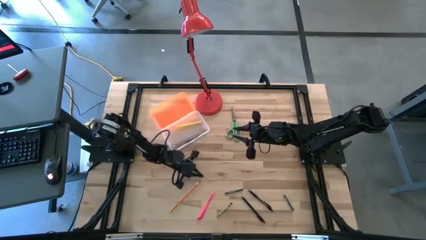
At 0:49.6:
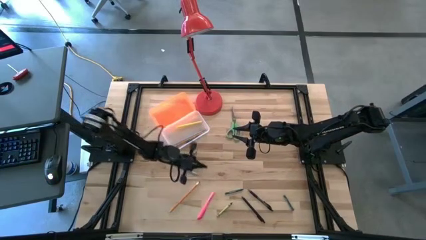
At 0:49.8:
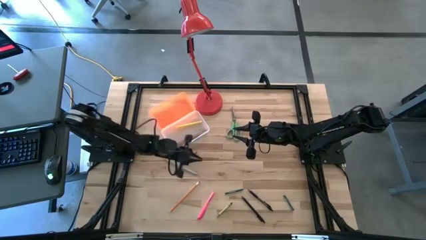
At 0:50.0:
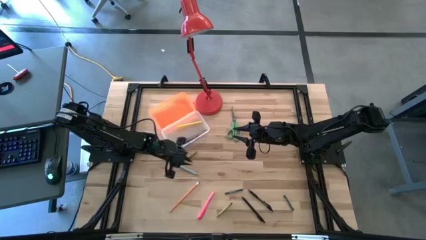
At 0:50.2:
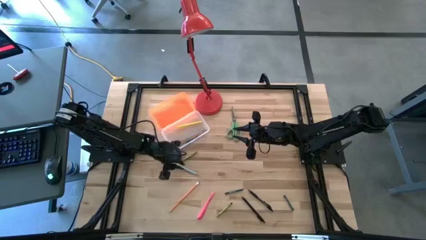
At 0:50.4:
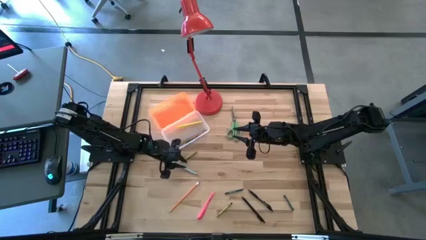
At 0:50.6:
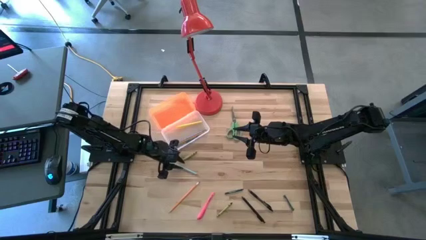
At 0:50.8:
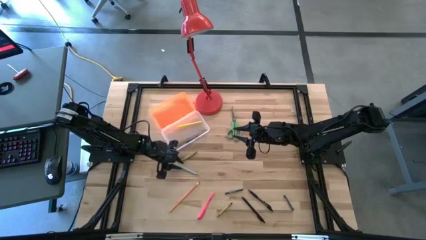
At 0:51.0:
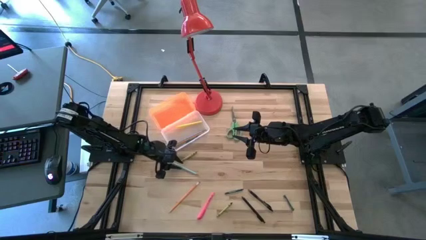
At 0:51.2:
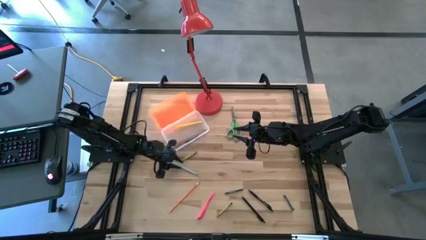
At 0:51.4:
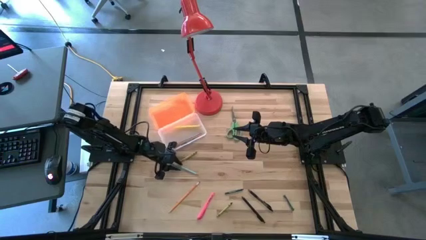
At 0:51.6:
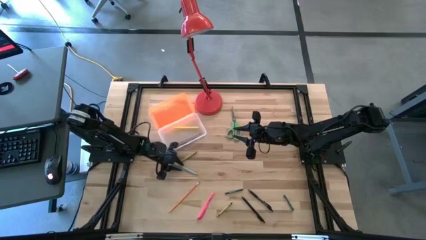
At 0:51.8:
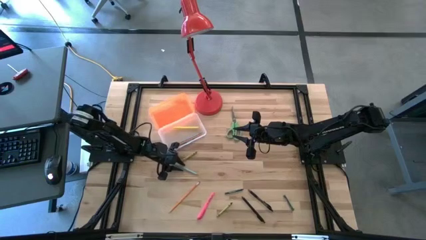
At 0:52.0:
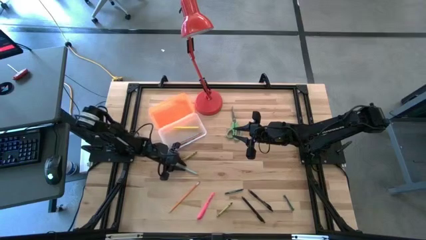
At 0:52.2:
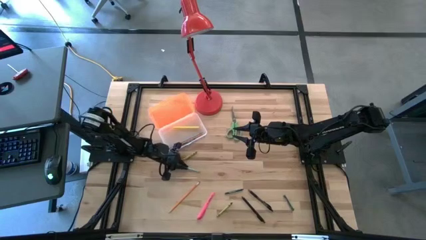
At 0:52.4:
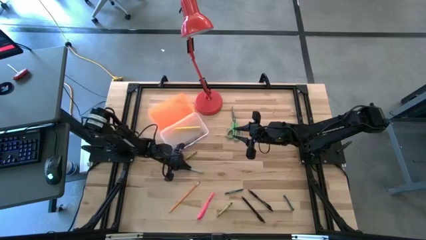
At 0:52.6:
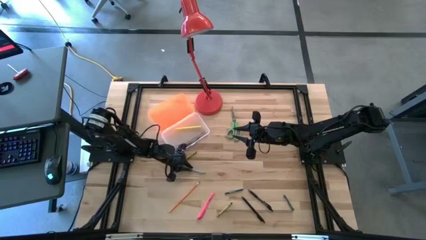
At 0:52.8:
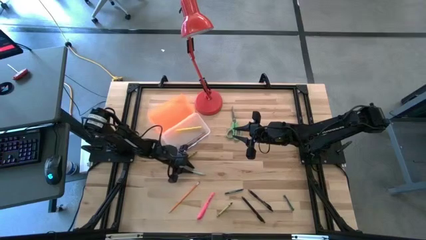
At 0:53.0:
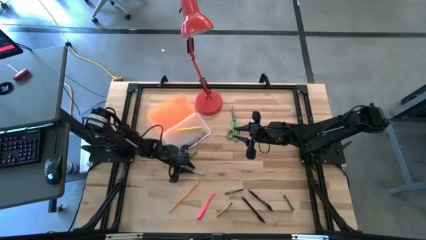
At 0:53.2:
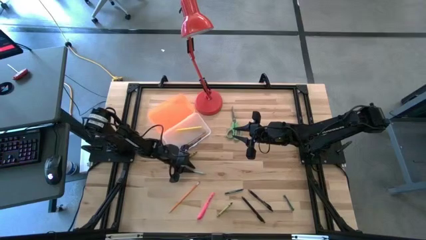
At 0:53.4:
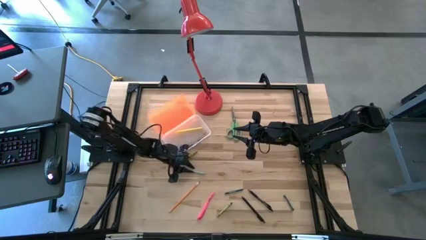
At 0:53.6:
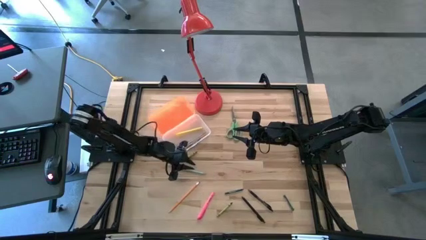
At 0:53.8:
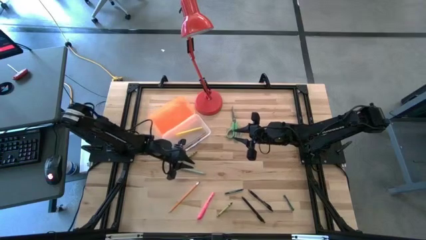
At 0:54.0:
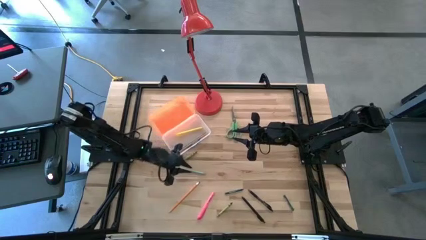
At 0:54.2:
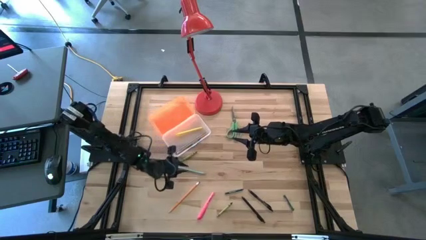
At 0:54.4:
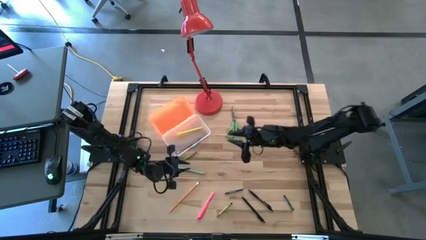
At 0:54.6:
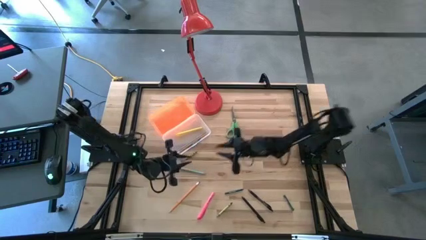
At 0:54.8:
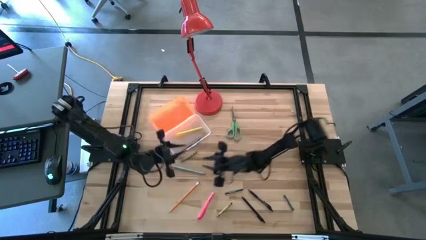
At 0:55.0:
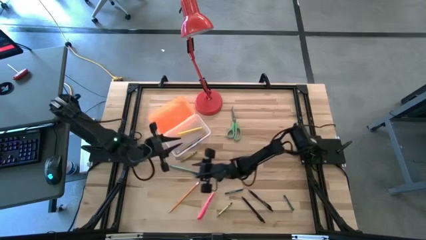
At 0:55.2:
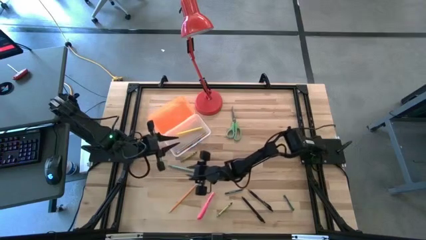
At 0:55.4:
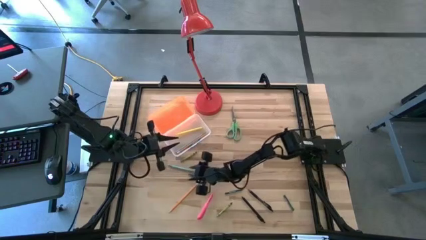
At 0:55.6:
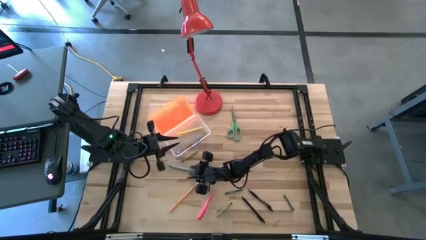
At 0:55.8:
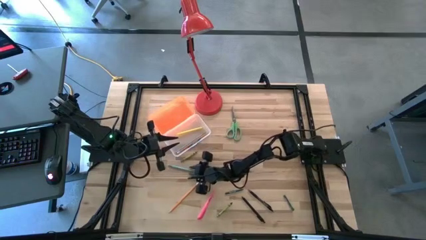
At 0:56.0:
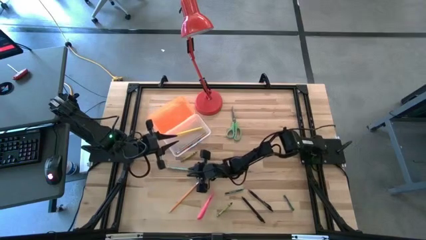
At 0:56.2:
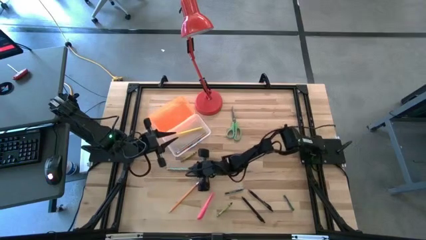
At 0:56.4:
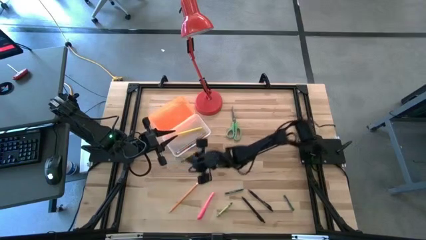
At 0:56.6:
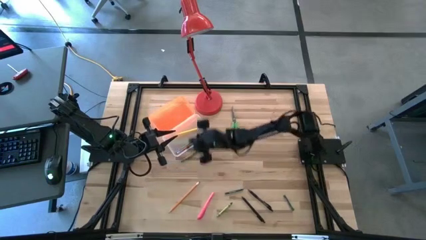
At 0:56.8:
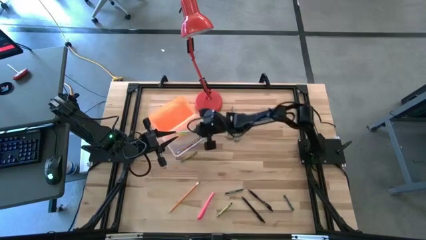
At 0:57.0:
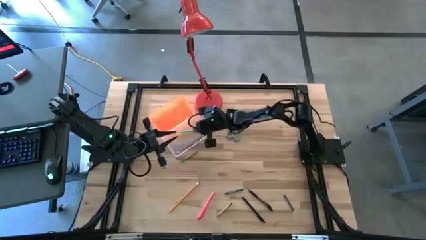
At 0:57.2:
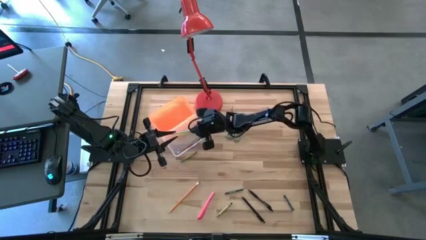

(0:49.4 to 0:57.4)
Task: Pick & place school supplies into a supply box
Put the blue pencil into the orange supply box

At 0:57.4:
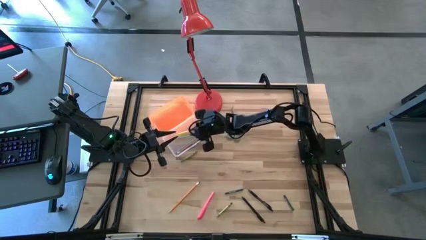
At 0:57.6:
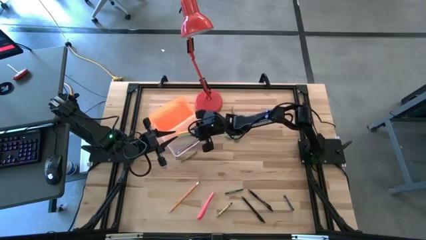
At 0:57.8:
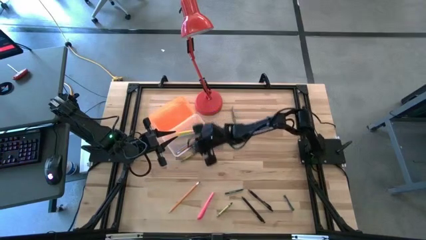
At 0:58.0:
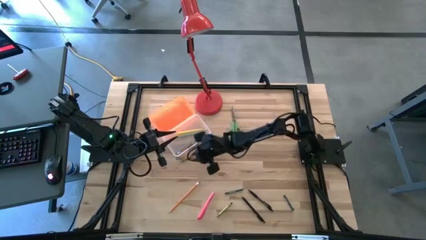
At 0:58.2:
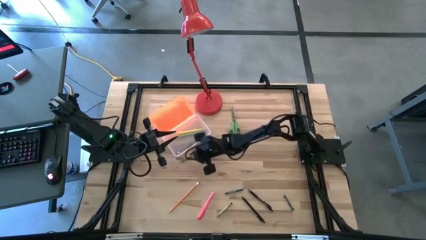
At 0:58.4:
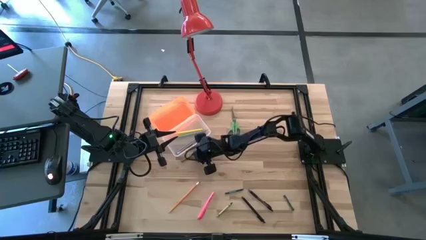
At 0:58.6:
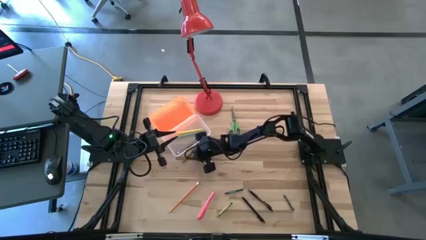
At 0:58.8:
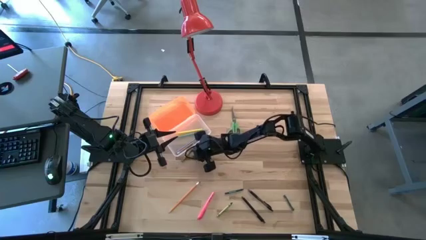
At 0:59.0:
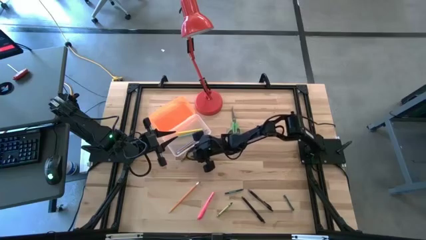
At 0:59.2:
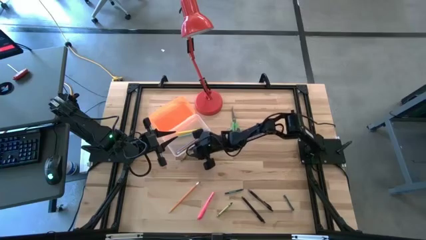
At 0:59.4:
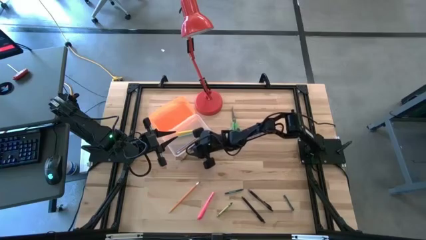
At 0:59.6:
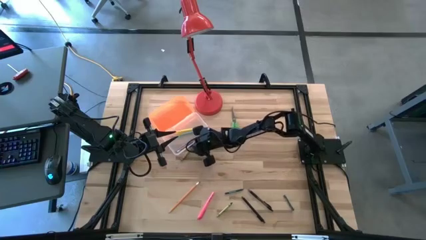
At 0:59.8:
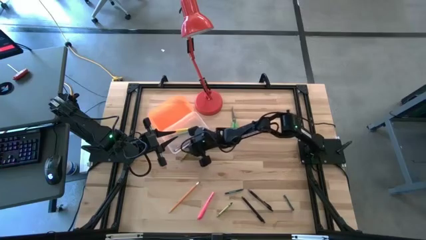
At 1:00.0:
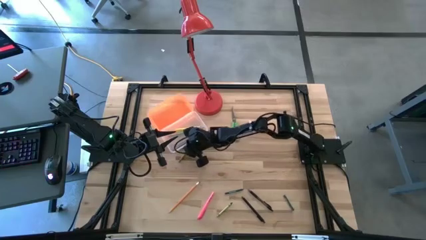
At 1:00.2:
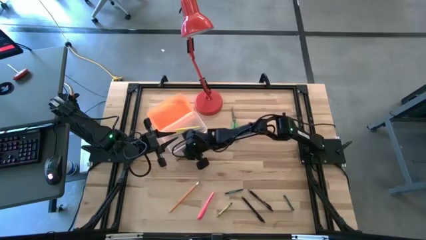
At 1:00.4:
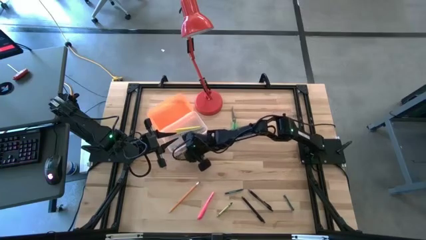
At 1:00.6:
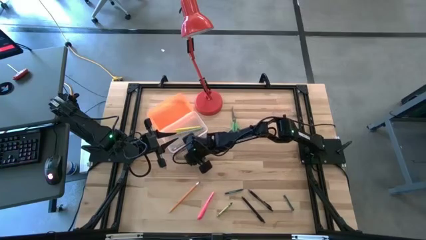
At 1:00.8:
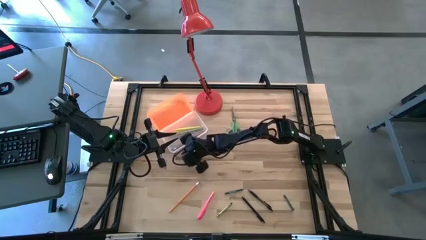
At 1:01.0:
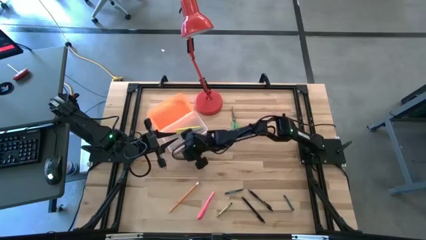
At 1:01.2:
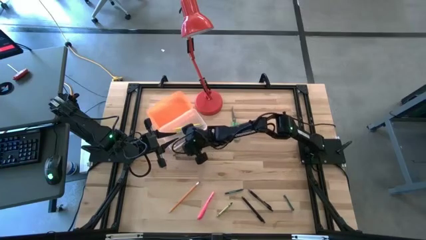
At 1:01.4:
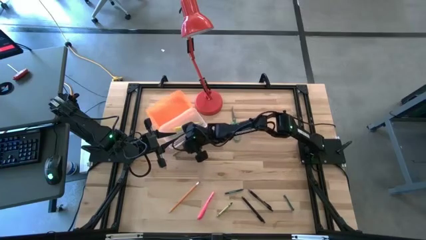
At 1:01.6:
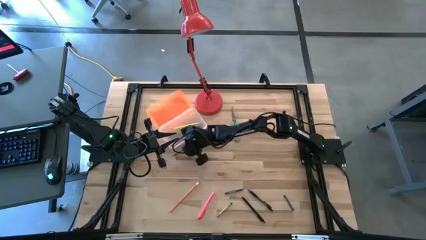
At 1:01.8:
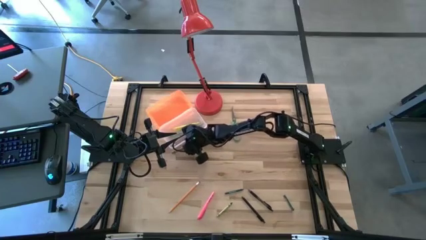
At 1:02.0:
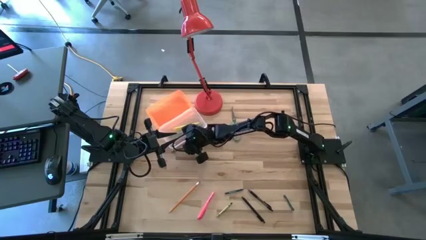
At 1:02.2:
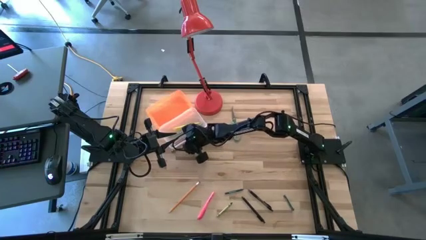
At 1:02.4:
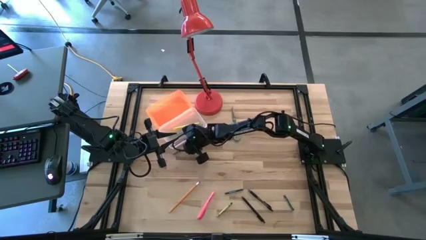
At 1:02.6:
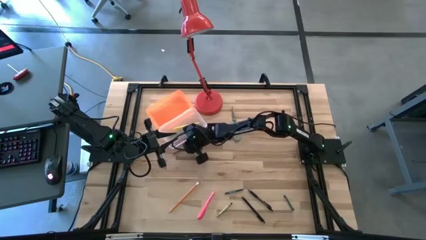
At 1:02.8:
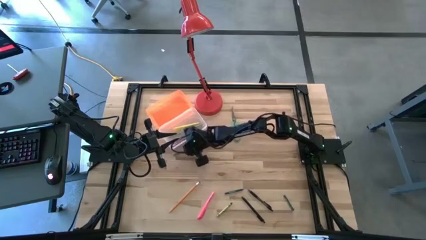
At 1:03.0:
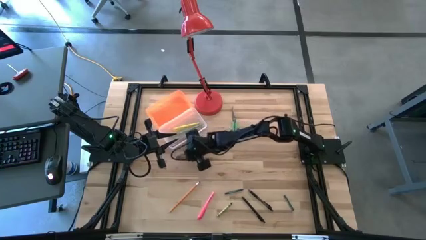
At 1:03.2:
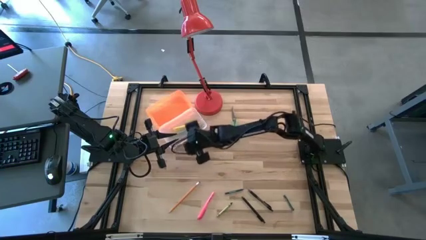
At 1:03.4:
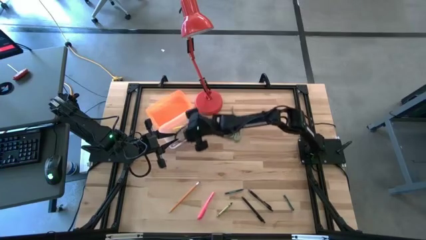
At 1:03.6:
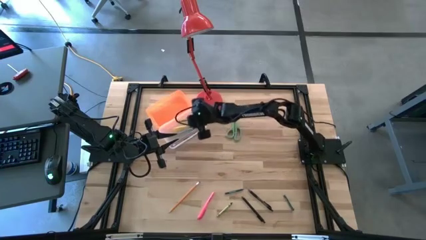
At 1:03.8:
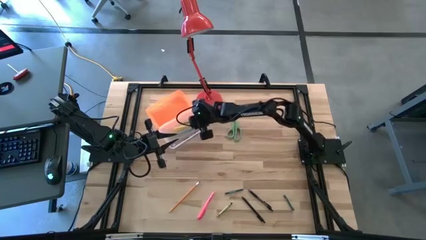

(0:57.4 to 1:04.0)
Put the top light green crayon into the orange supply box

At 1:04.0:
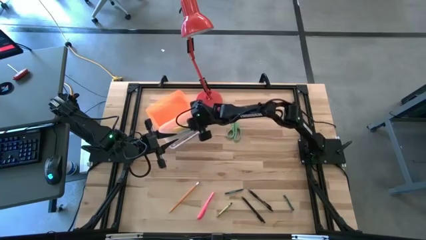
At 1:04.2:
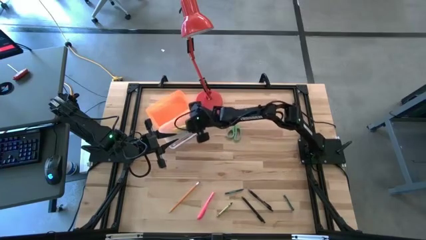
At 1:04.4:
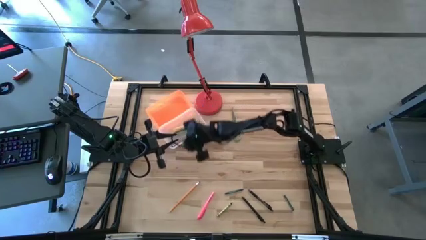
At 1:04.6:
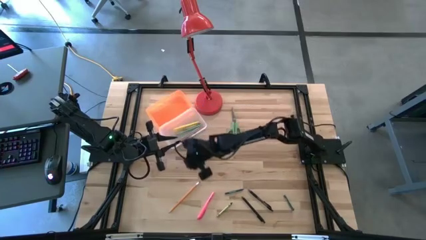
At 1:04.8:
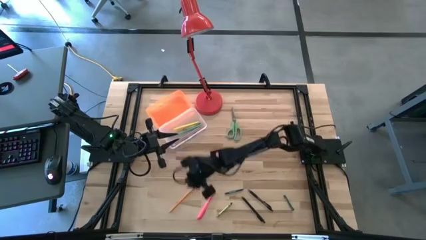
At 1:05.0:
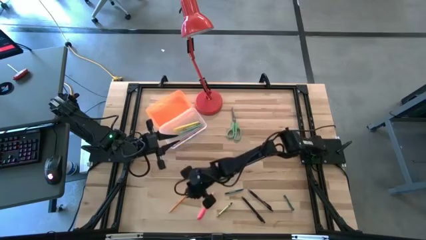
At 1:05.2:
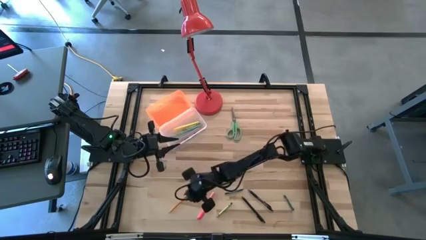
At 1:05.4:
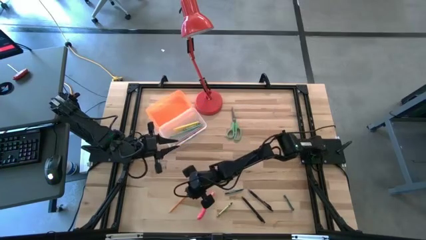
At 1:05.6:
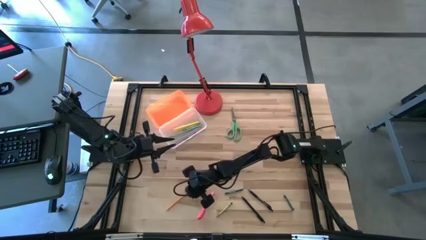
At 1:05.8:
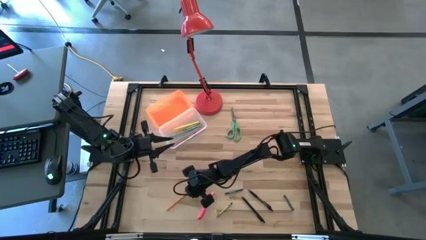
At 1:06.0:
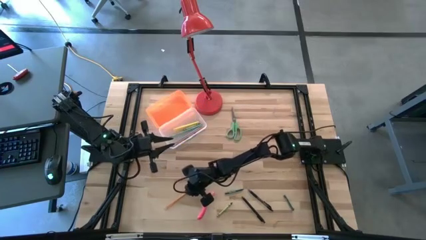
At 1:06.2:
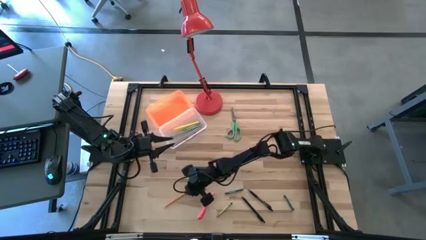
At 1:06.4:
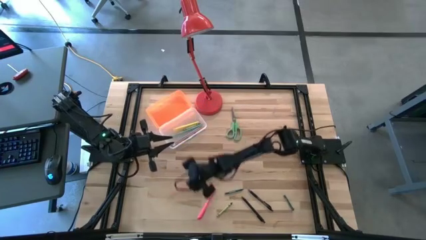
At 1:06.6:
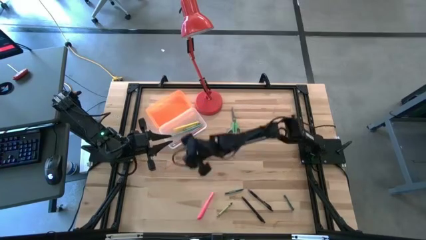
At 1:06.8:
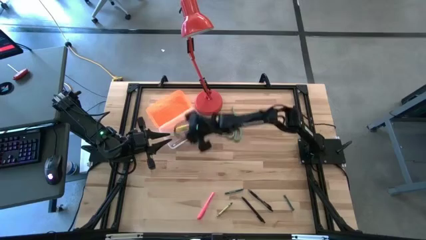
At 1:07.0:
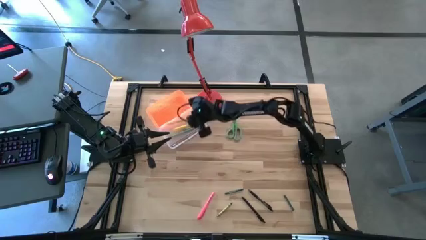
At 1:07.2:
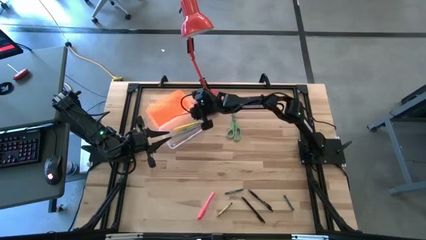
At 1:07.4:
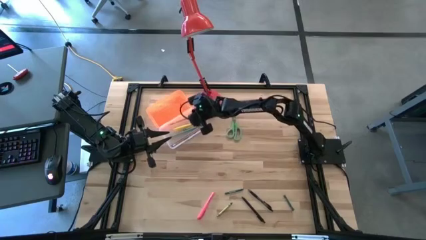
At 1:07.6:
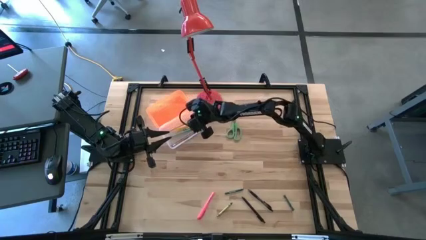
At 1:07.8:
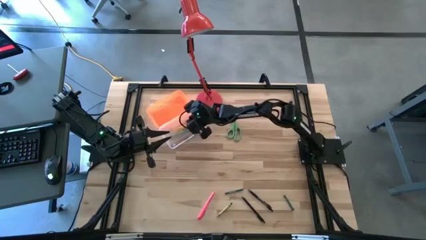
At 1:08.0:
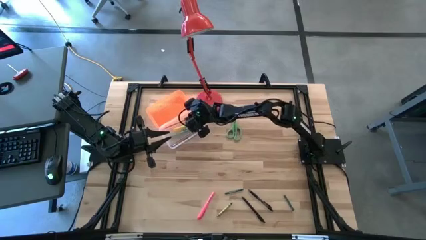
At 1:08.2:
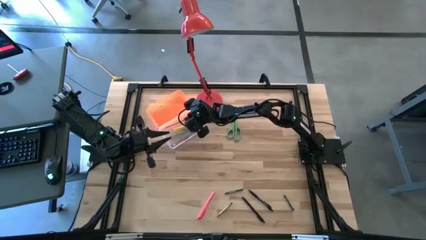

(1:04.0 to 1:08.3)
Put the orange pencil into the orange supply box
